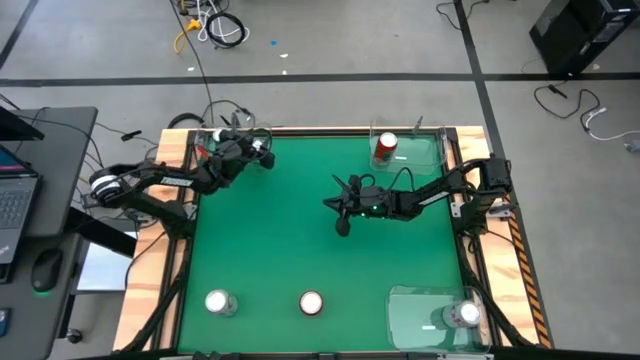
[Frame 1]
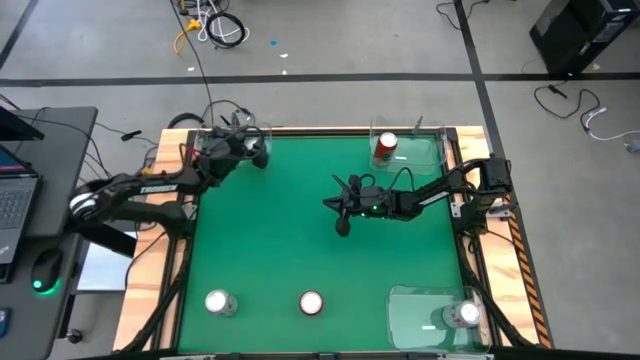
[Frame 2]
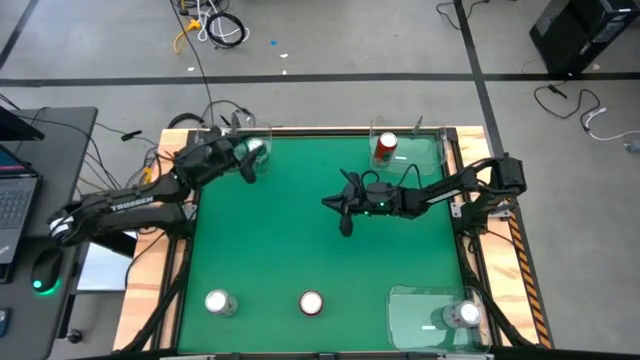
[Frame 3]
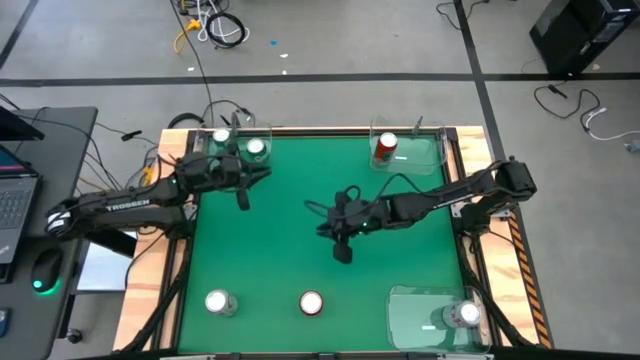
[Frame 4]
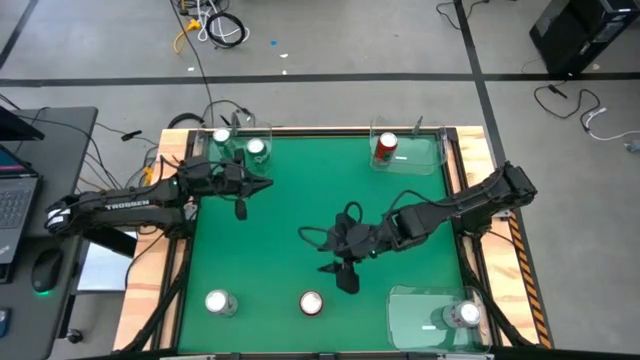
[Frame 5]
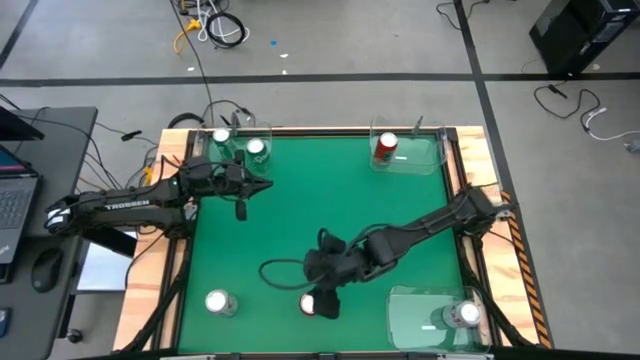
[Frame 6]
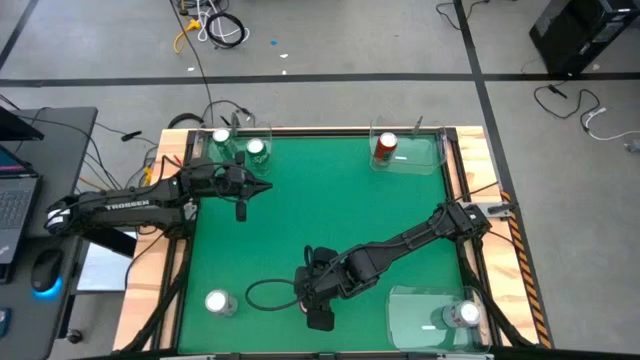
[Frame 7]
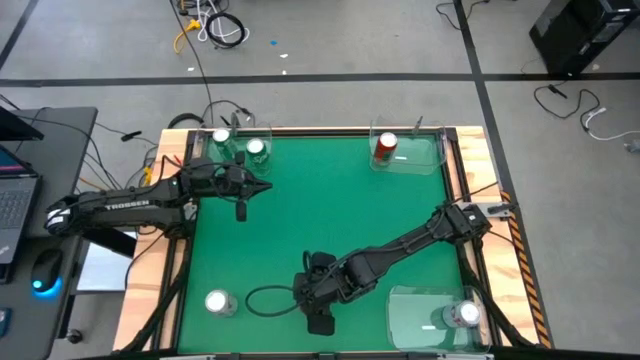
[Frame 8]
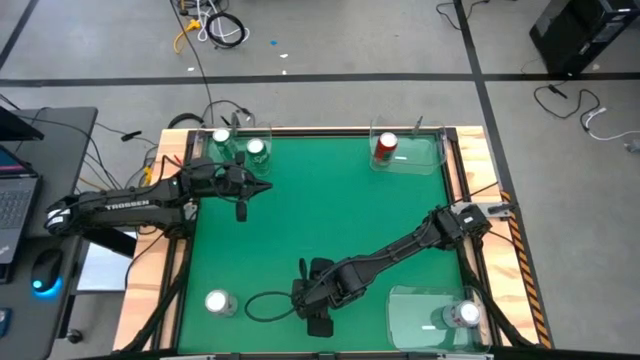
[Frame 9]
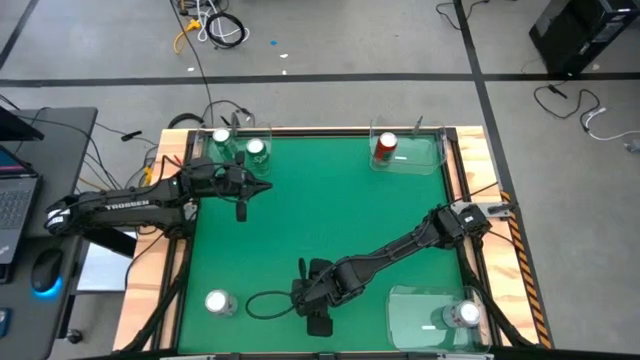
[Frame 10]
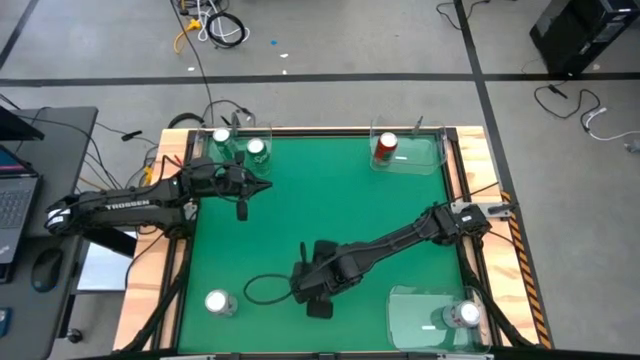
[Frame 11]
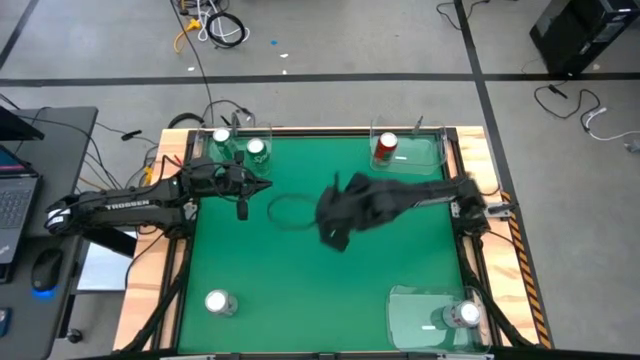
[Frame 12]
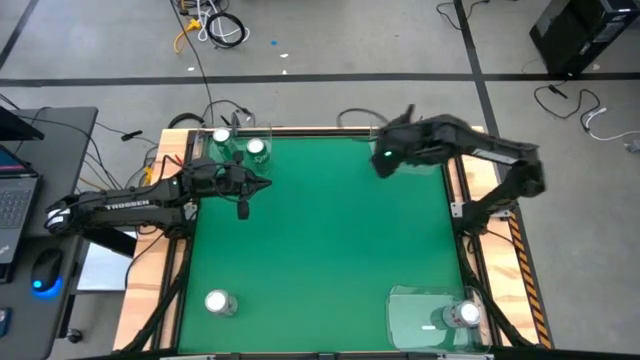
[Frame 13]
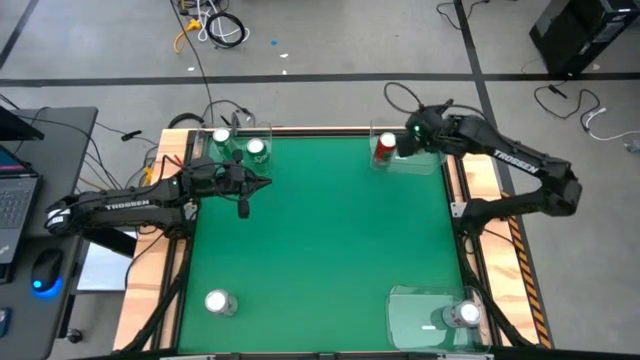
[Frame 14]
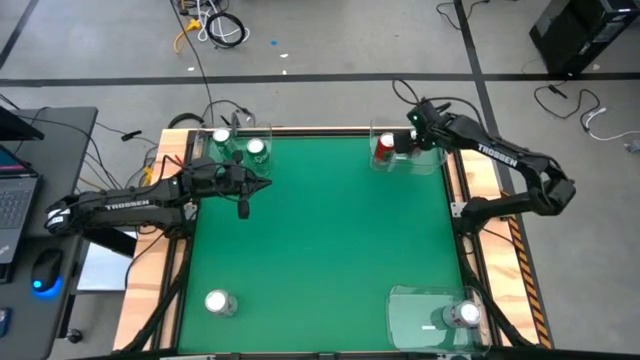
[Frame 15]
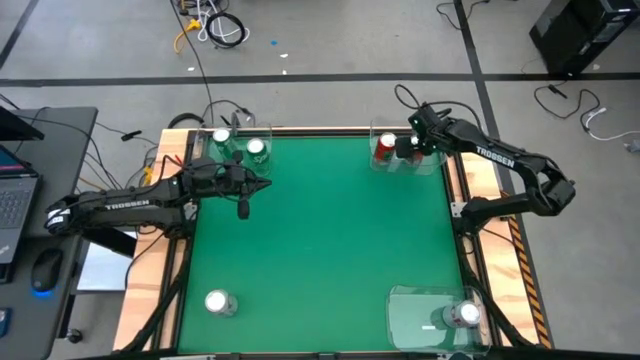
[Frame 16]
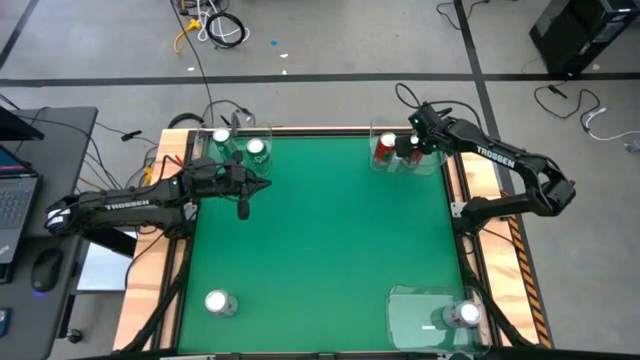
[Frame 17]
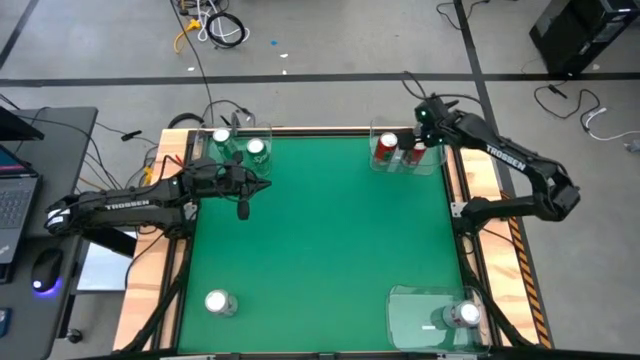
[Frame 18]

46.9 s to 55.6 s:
Task: Sort soda cans
Put the red-black soda can into the top right transparent bin

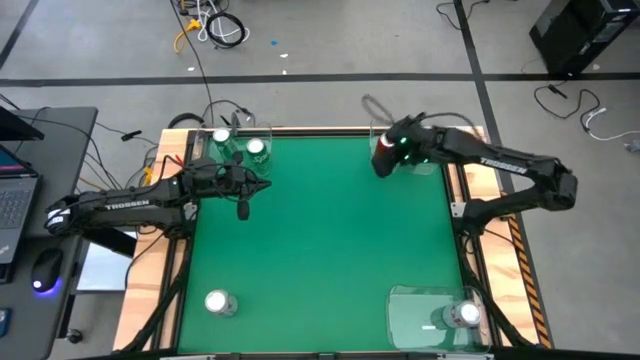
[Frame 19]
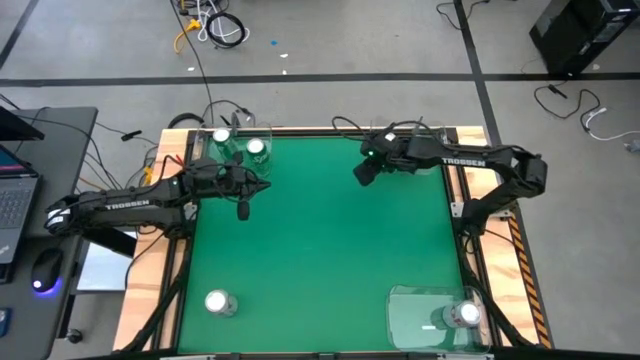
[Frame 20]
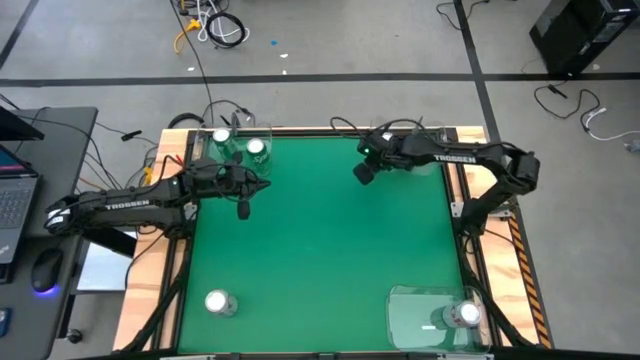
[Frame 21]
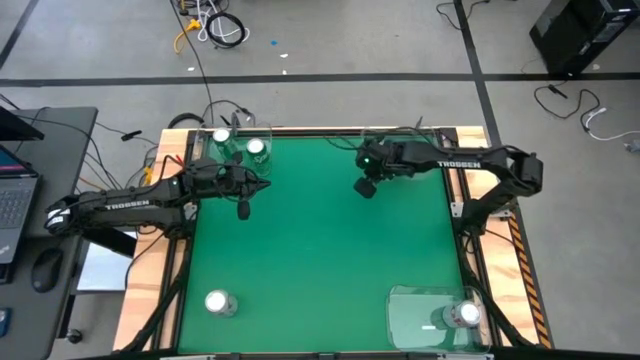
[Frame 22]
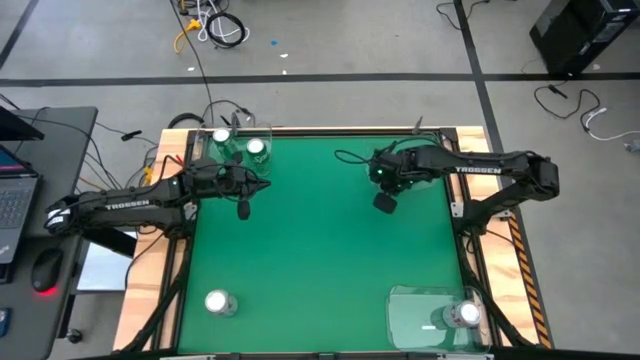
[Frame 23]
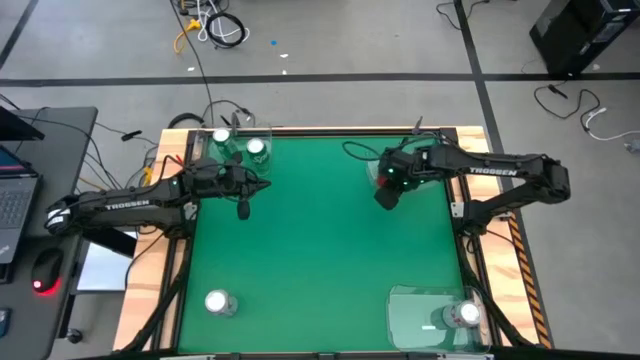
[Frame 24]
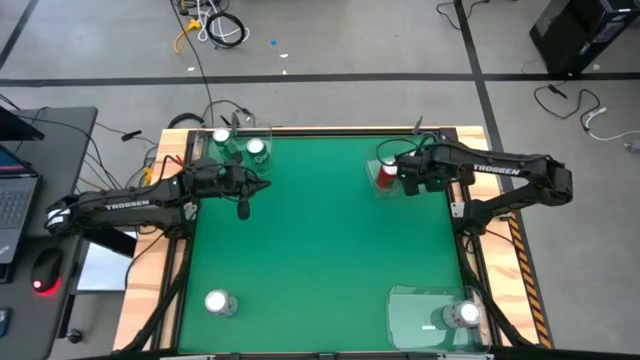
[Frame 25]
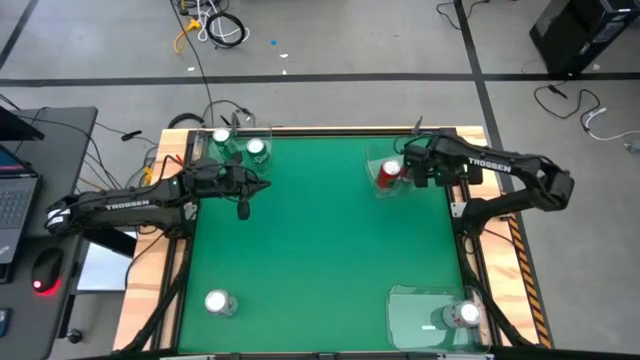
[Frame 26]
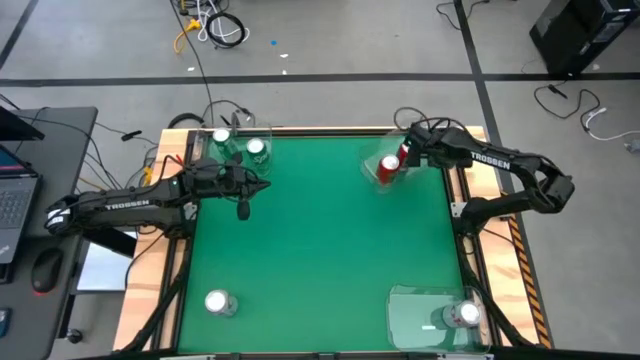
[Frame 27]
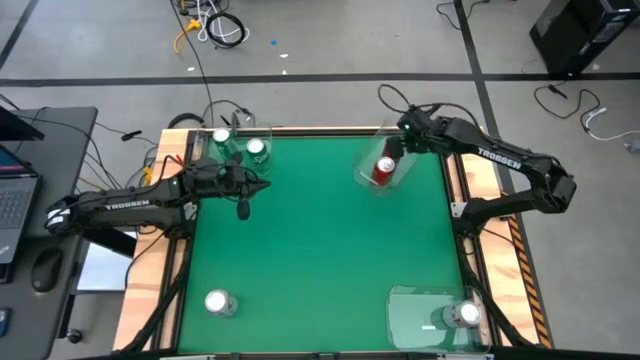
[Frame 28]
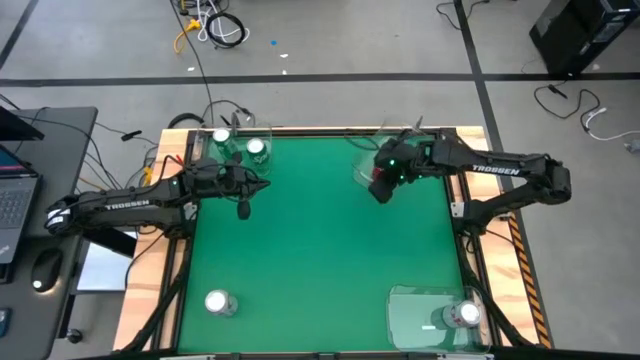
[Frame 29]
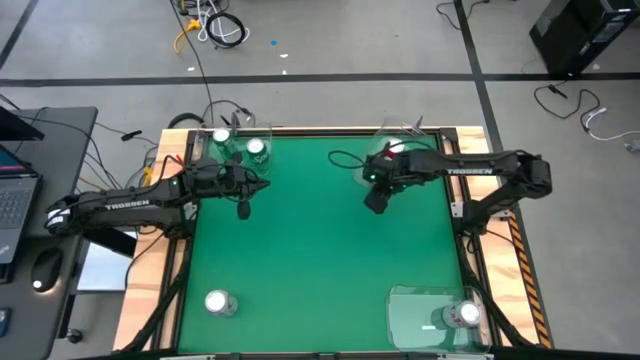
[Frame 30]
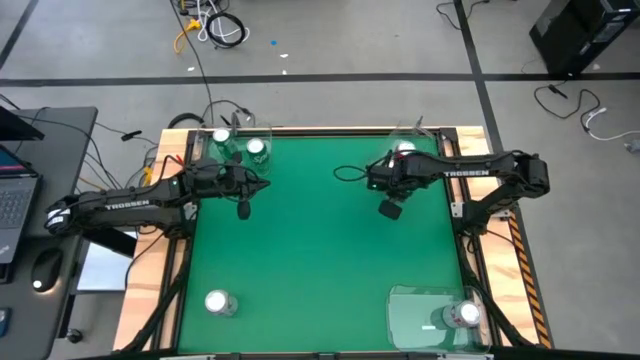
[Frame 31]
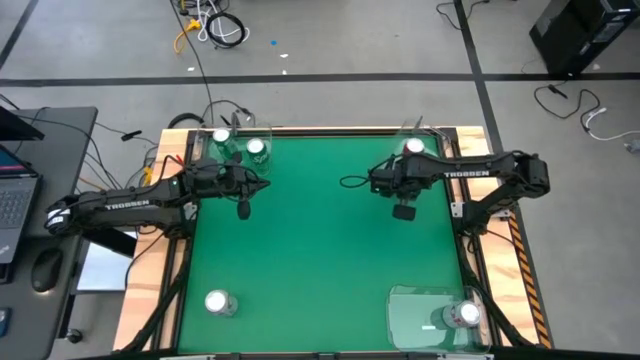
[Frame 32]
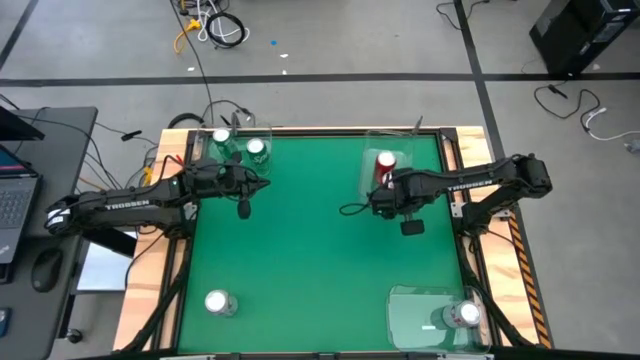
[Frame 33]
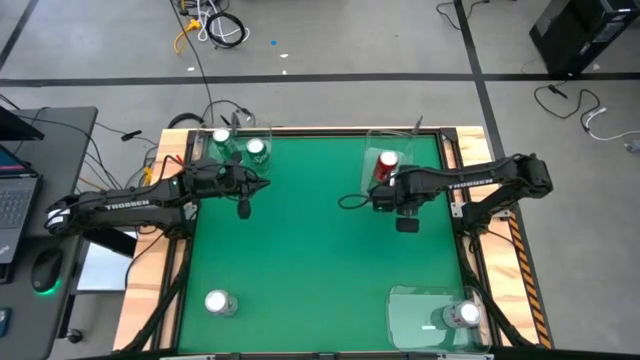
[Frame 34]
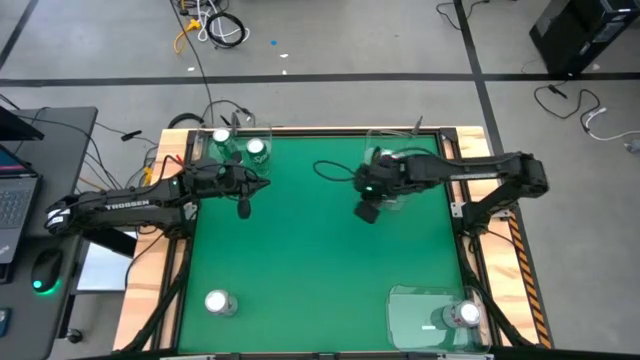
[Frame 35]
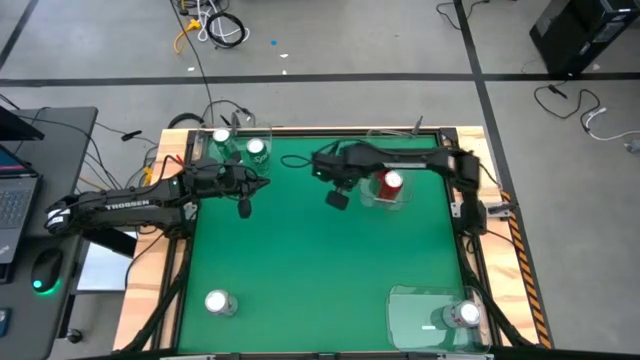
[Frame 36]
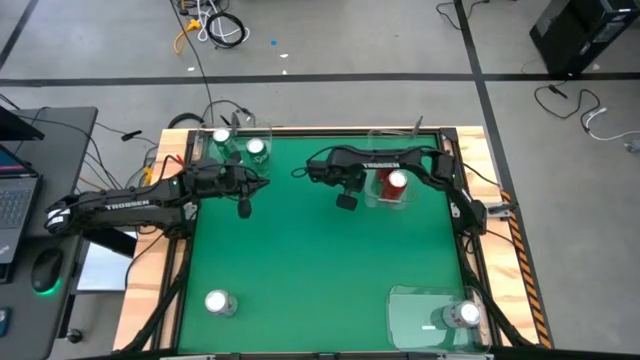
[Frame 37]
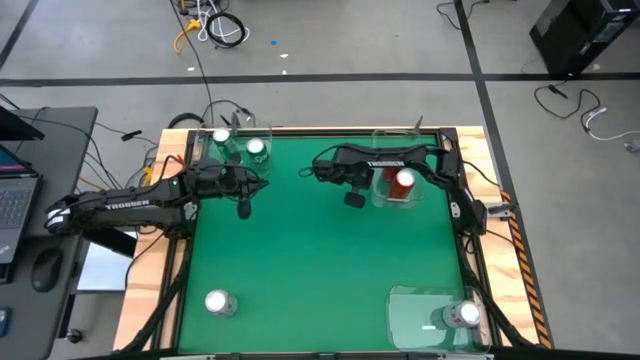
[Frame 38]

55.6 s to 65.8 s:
Adjust the top right transparent bin

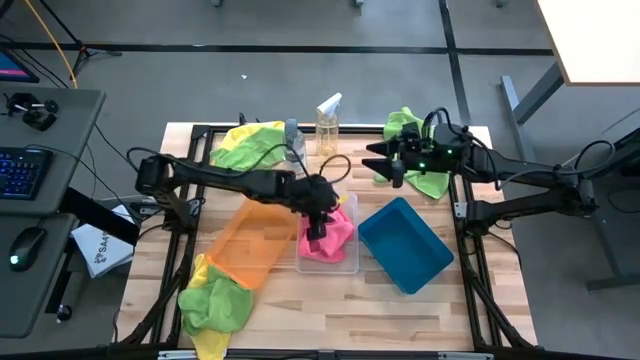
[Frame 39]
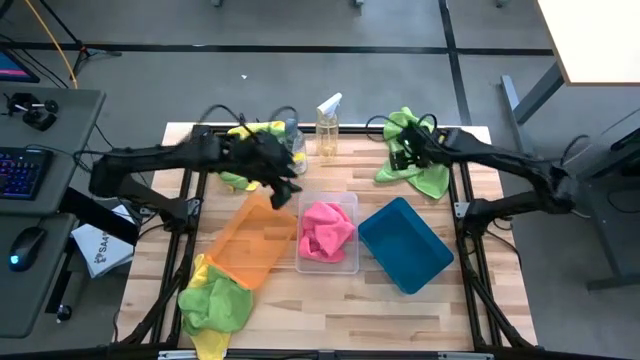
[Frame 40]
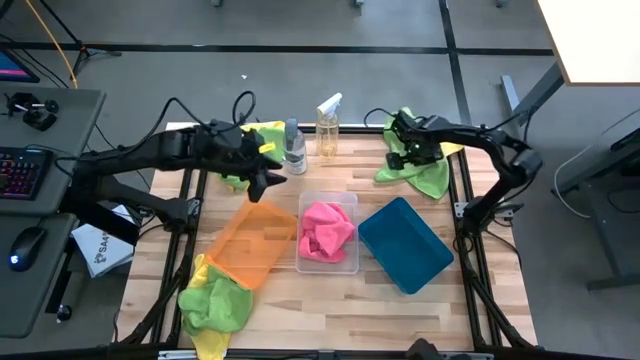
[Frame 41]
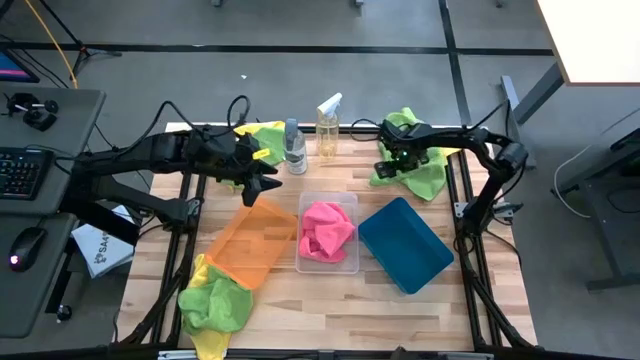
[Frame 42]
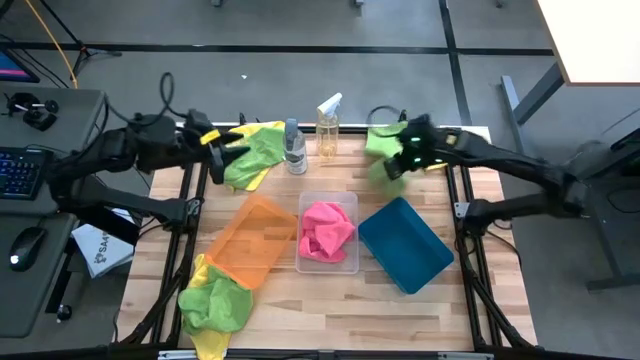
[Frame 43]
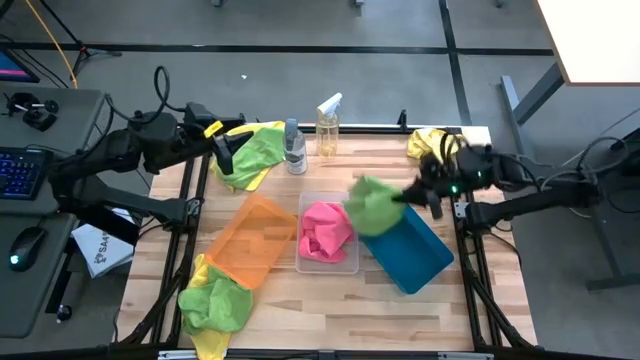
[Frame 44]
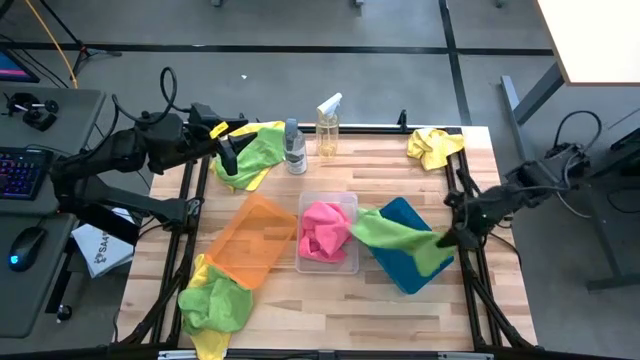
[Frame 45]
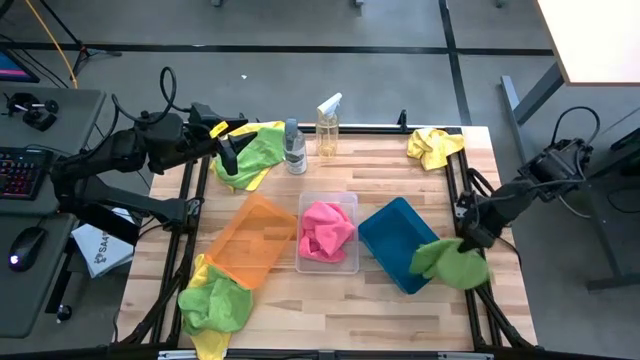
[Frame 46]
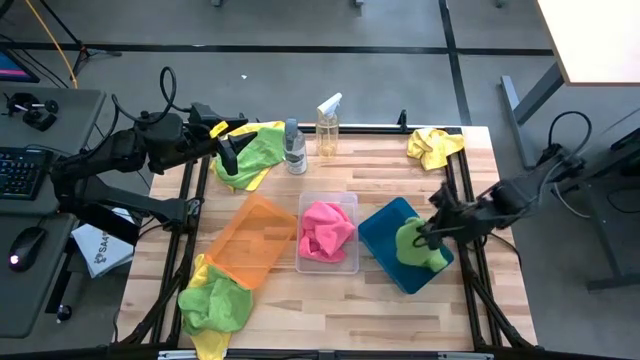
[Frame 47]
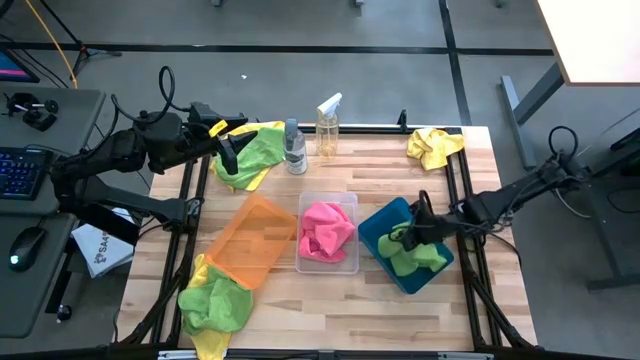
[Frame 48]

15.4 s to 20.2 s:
Task: Sort microfiber towel by color & place in baskets
Put the top right green microfiber towel into the blue bin
